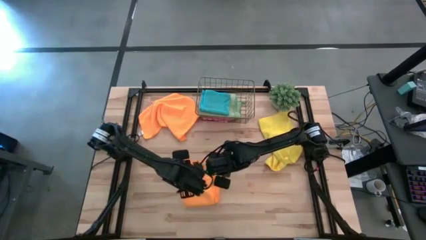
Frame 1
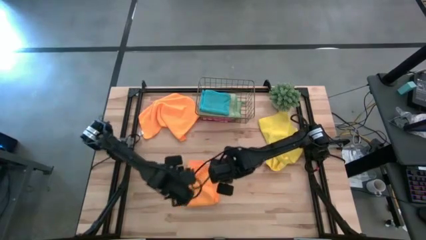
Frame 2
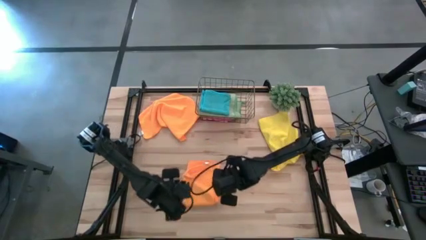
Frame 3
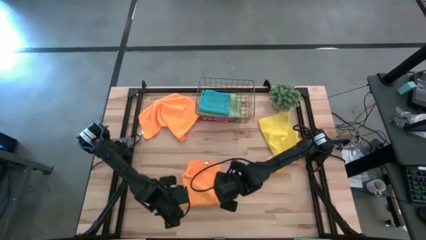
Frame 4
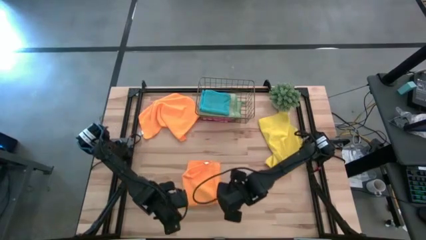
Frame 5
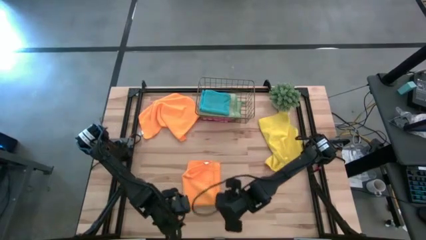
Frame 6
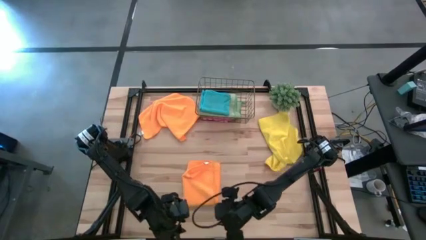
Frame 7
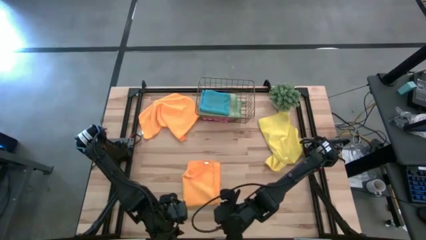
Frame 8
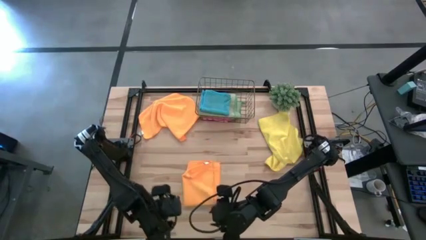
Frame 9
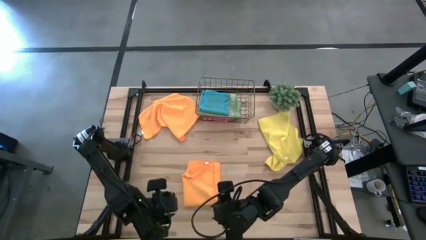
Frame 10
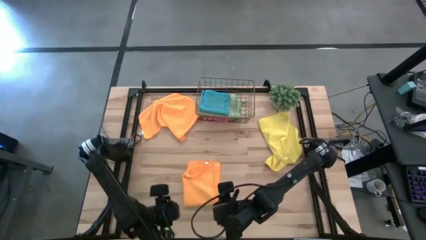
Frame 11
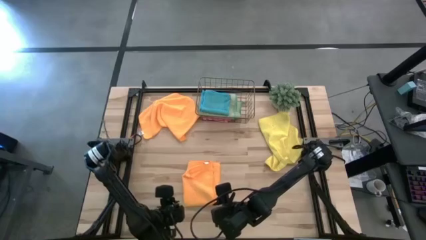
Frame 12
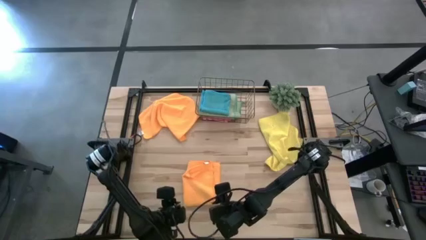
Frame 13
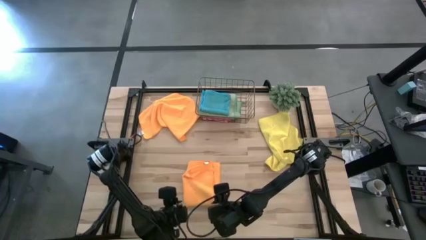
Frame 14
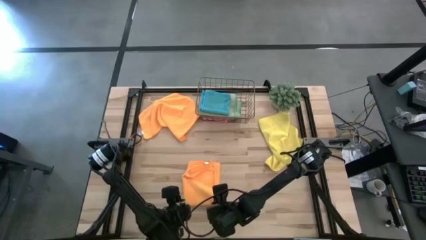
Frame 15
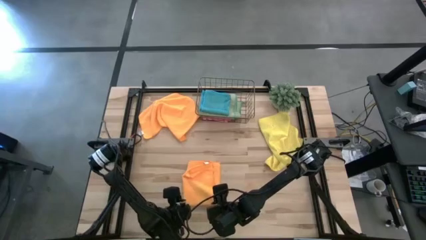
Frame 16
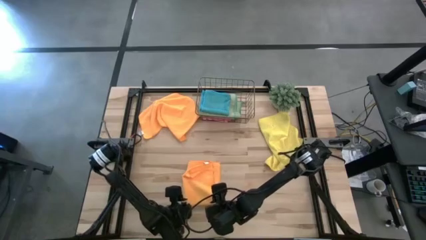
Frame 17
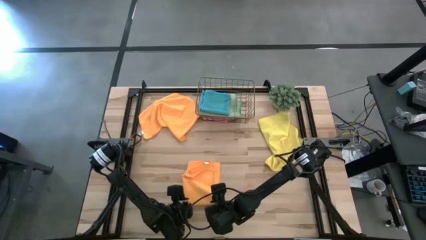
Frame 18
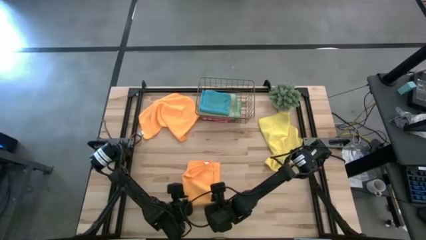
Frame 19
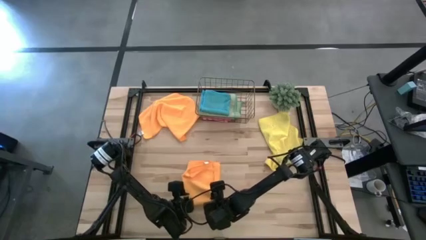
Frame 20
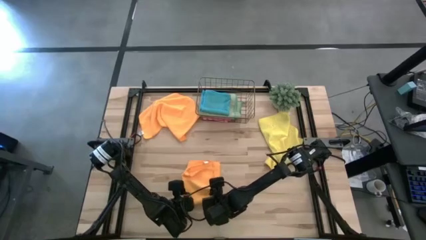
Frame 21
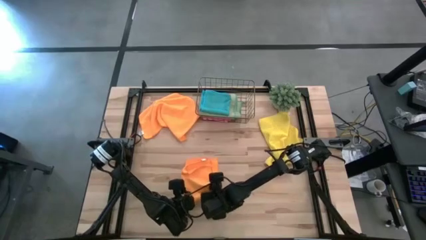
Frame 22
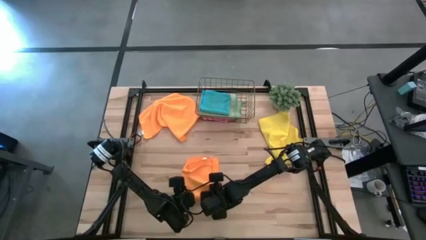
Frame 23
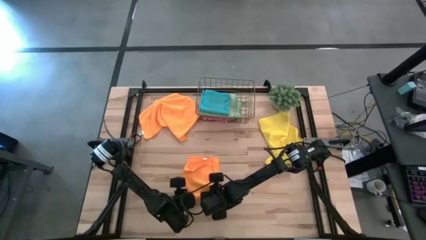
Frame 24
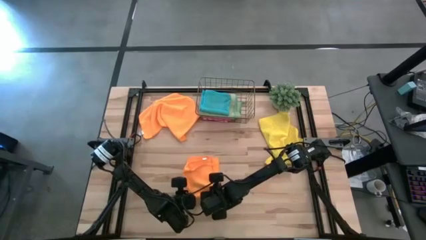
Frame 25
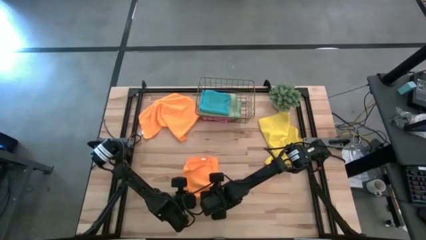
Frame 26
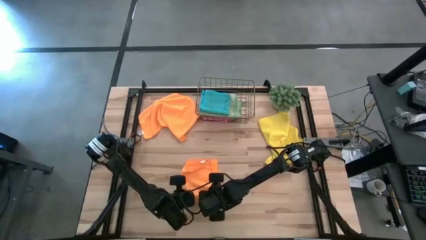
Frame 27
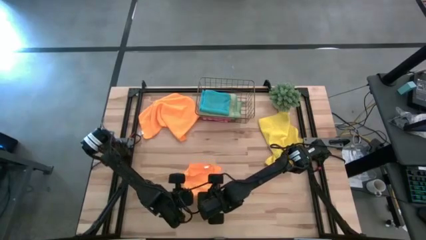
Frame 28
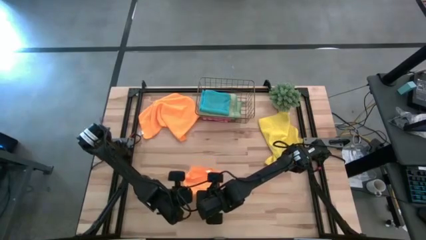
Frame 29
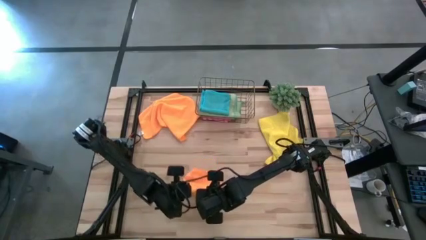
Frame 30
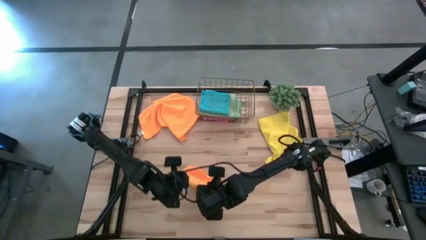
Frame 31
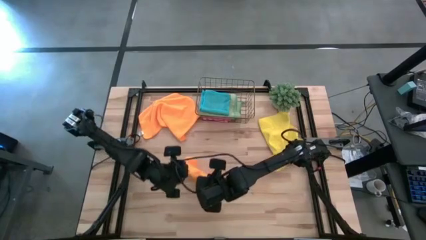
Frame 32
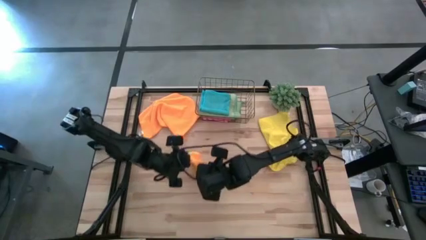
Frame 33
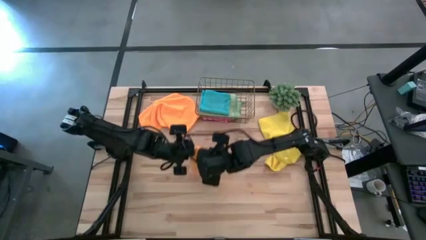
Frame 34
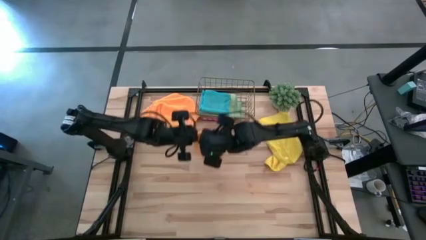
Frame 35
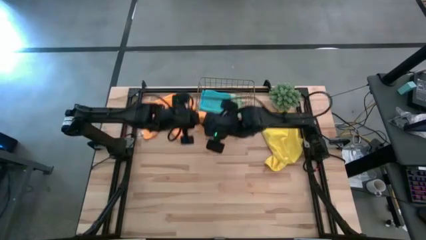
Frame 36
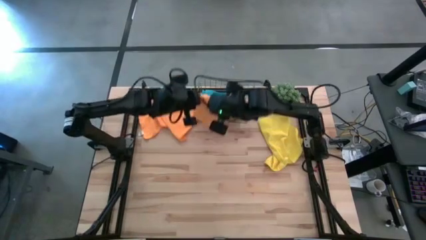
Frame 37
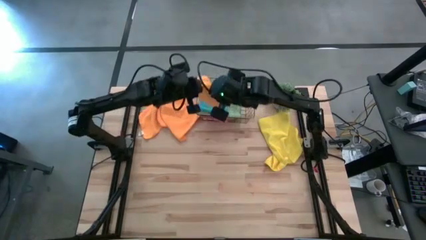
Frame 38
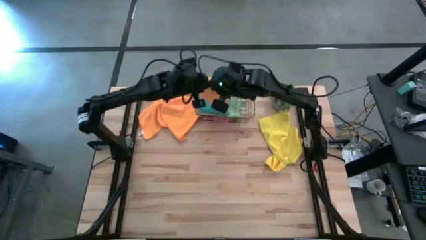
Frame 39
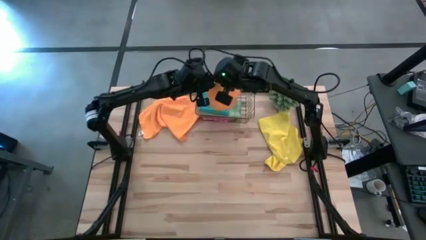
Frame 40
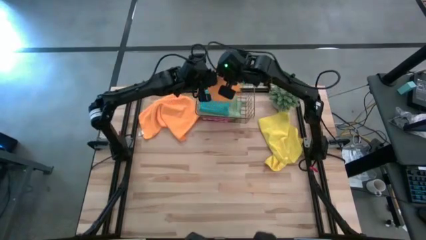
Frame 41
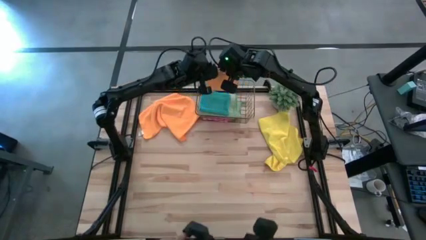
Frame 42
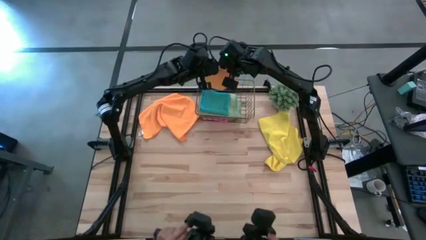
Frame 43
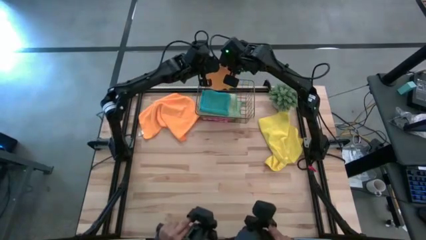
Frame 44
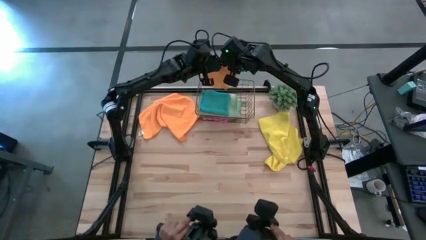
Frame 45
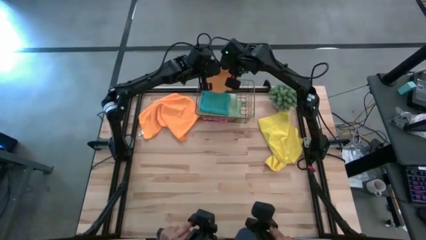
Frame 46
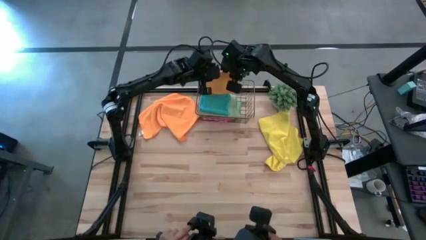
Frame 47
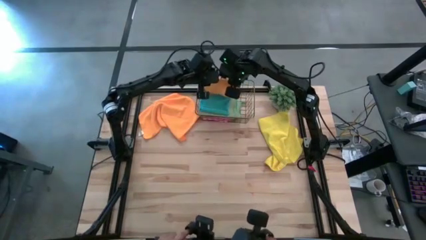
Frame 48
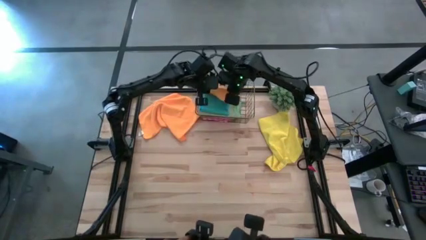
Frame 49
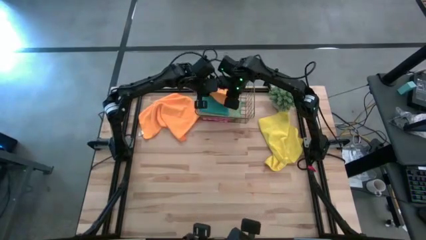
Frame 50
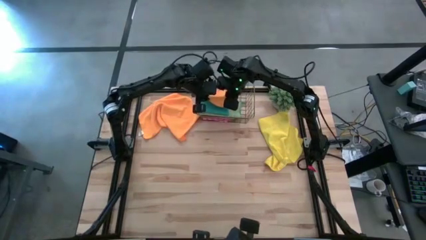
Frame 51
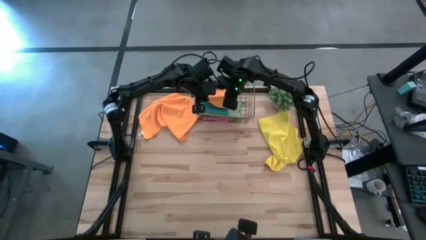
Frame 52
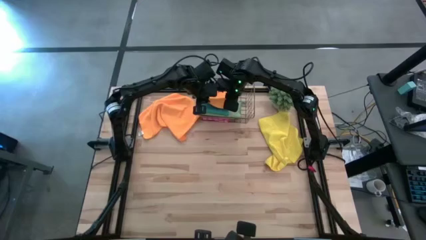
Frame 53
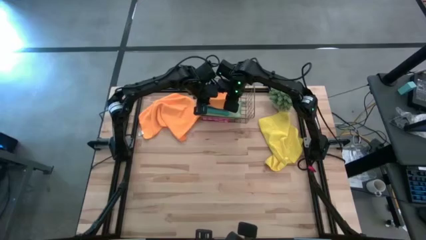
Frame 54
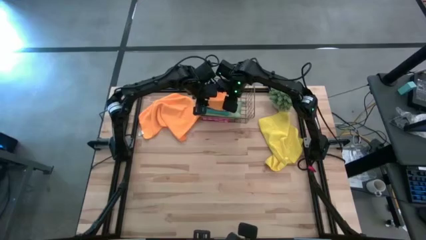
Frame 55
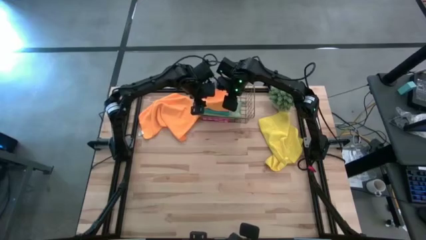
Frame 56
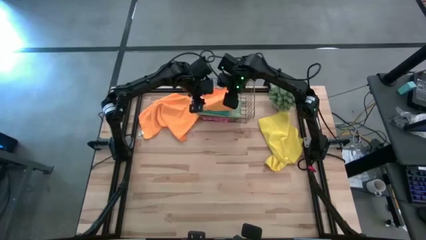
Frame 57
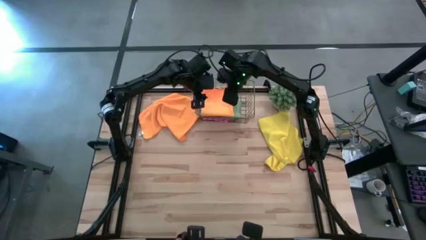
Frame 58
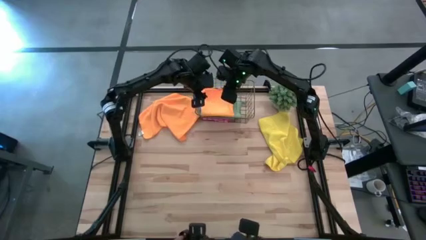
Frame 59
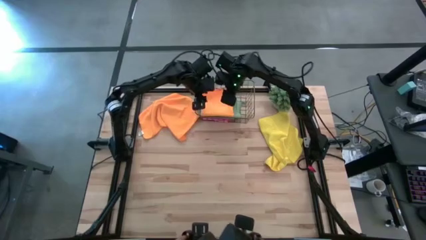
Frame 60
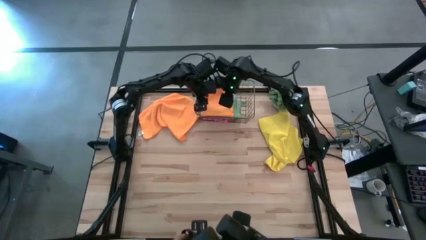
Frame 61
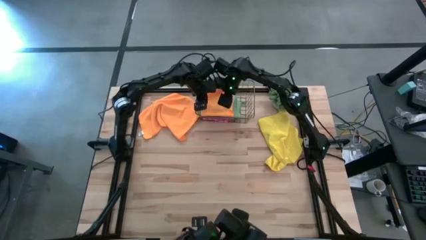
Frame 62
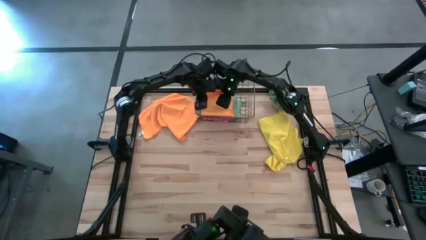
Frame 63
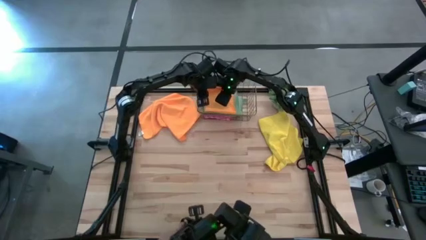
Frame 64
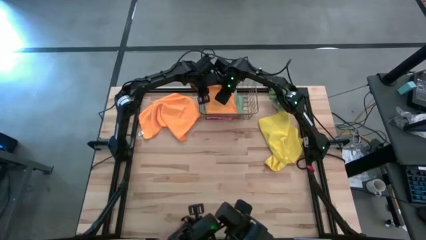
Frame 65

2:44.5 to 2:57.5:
Task: Fold microfiber towels
Stack the folded bottom orange microfiber cloth on top of the folded blue microfiber cloth

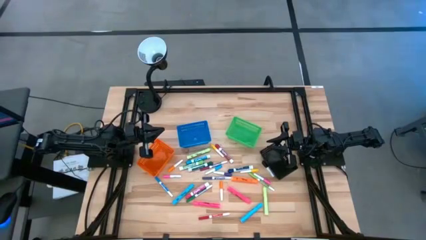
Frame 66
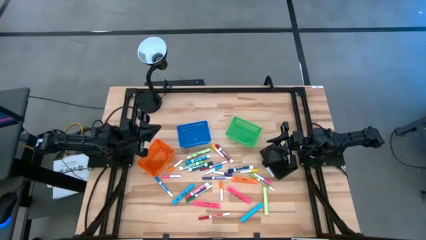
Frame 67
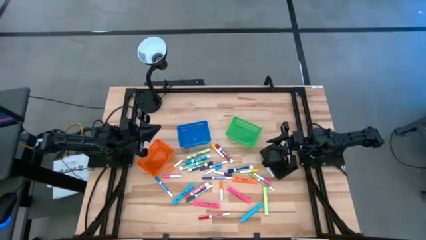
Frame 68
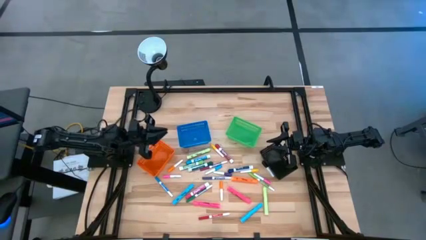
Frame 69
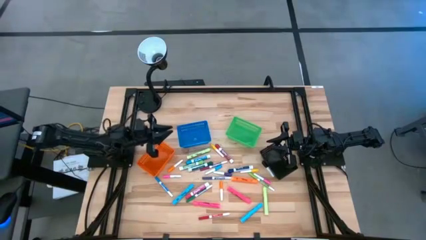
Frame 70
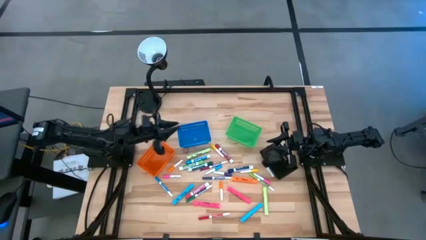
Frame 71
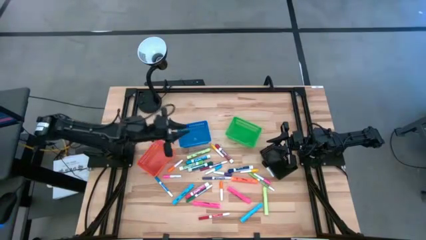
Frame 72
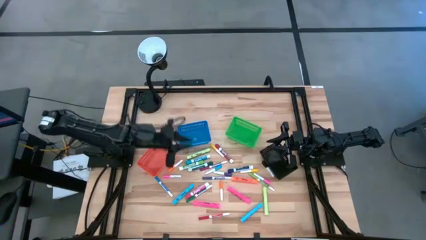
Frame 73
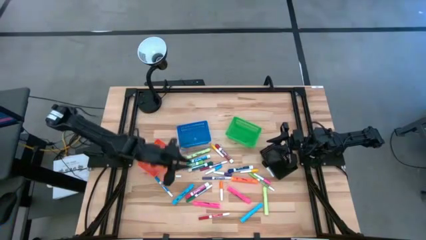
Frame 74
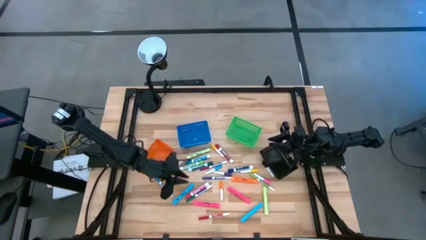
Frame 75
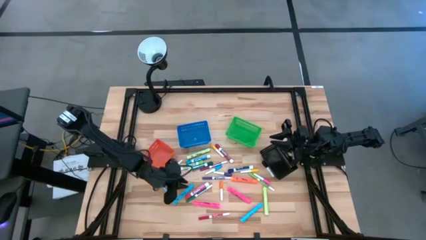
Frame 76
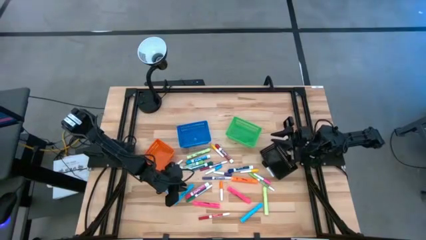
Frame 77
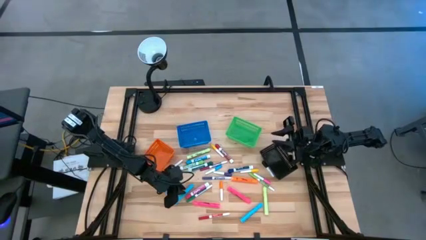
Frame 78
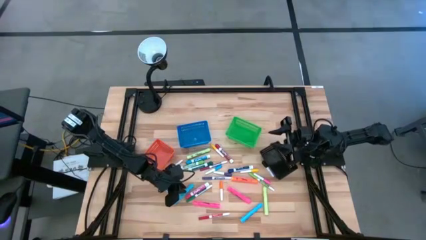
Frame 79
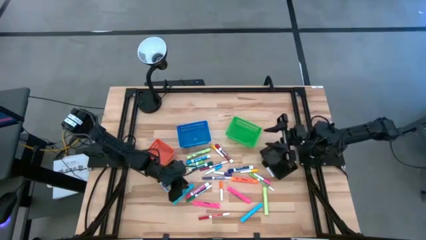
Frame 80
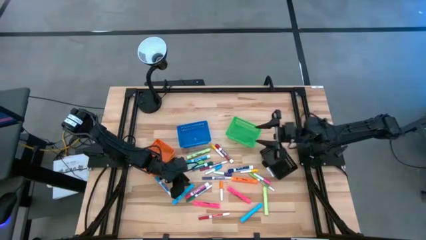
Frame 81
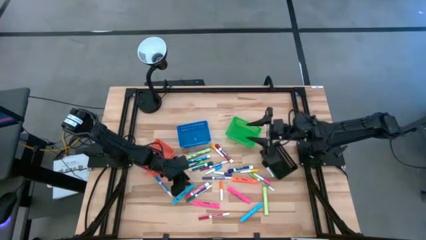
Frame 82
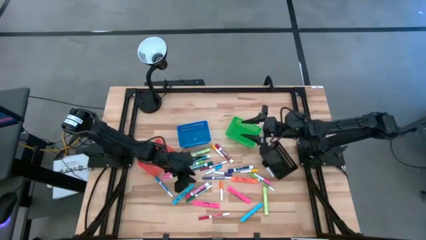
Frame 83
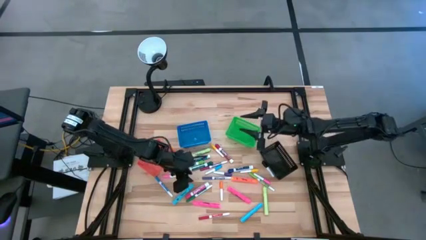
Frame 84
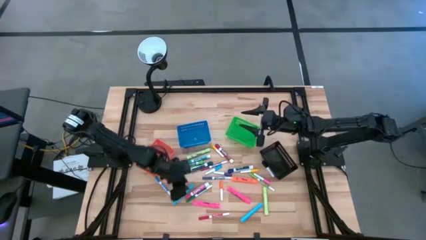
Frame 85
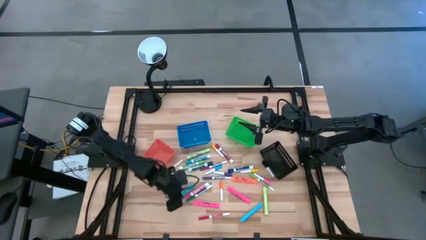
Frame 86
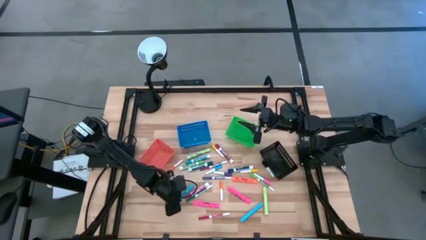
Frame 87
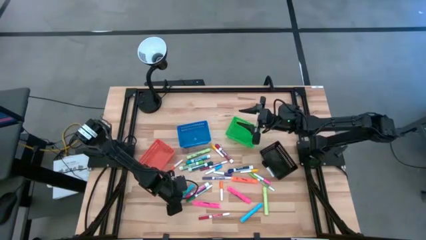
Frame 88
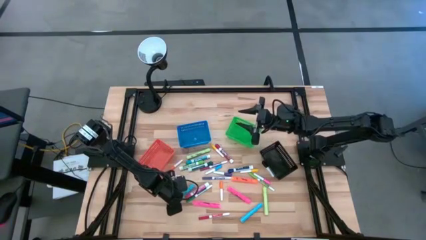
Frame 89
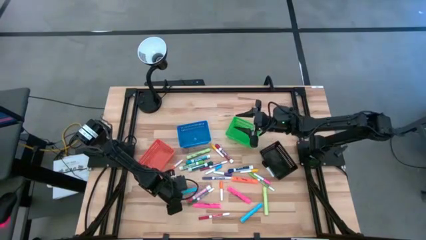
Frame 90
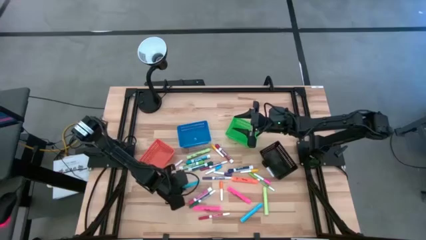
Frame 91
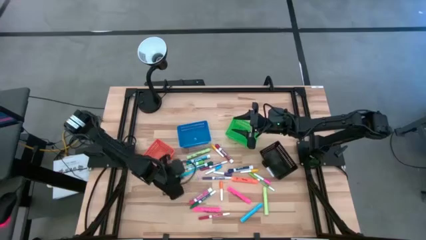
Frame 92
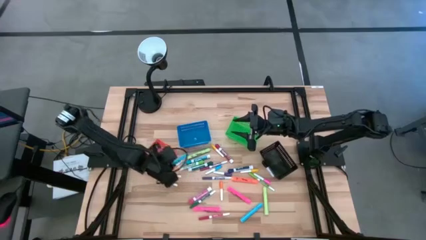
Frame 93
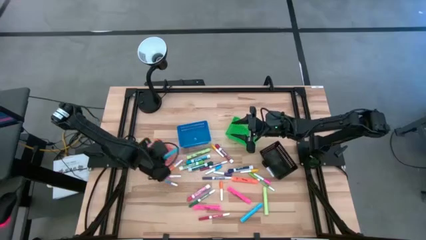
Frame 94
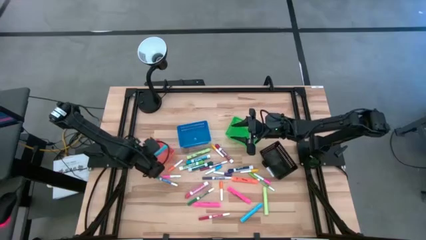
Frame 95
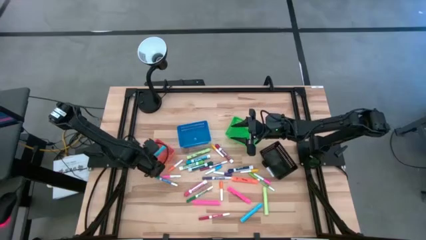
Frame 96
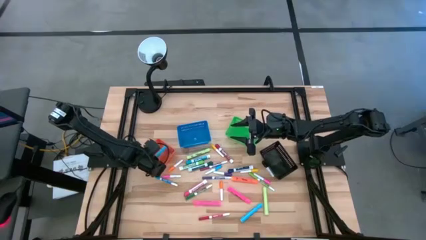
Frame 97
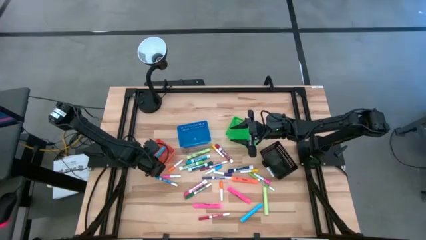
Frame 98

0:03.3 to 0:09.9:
Task: Pick & Place Markers
Put the left blue highlighter pen into the orange basket
